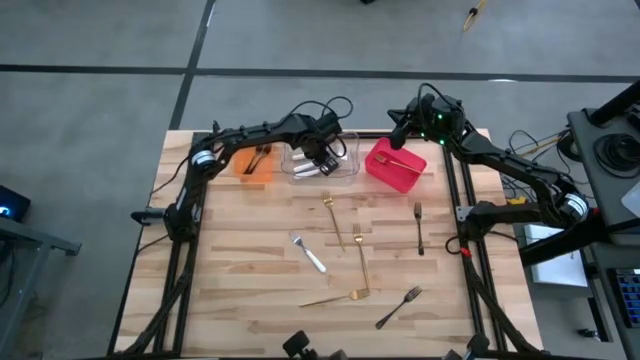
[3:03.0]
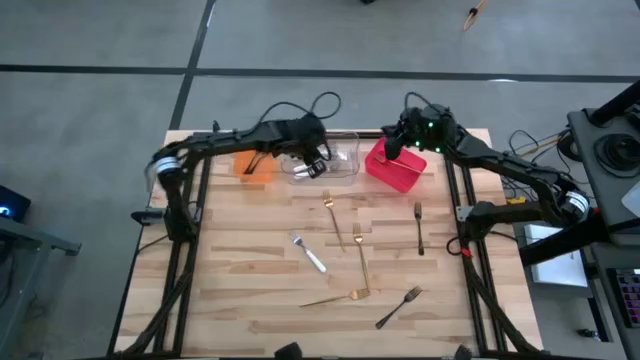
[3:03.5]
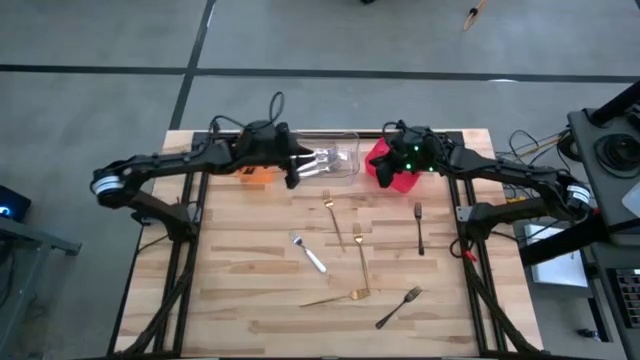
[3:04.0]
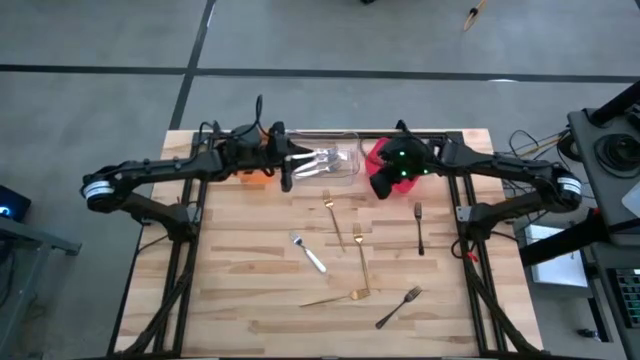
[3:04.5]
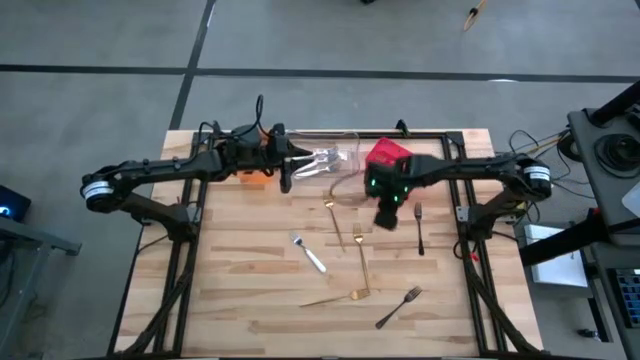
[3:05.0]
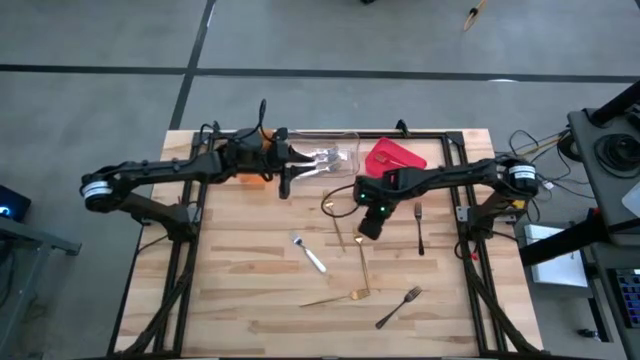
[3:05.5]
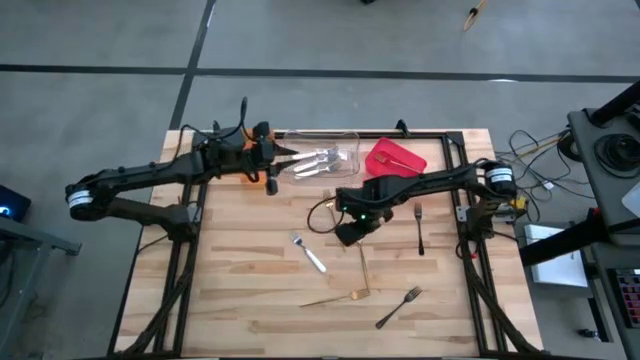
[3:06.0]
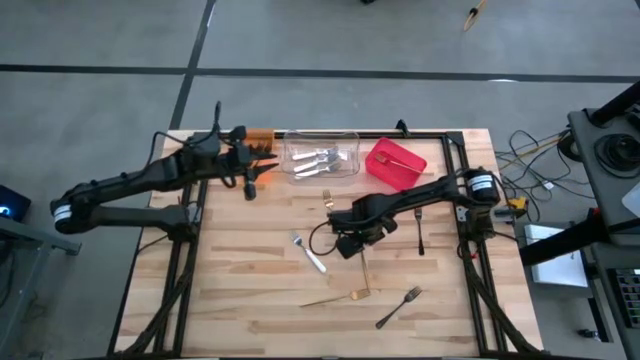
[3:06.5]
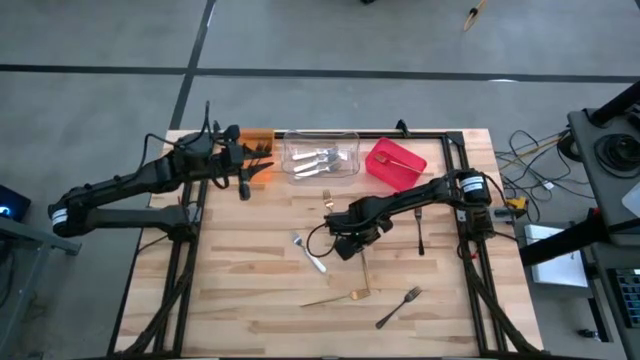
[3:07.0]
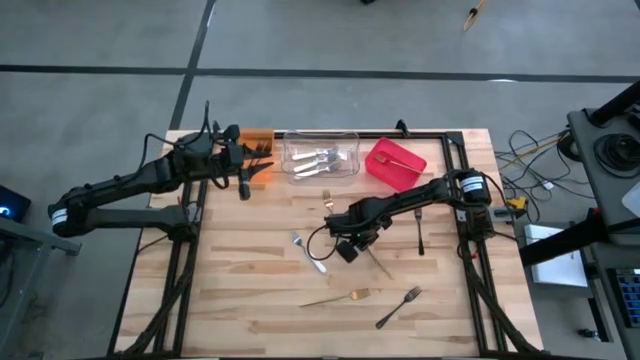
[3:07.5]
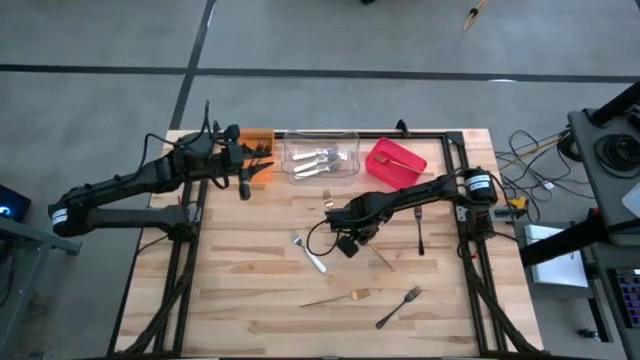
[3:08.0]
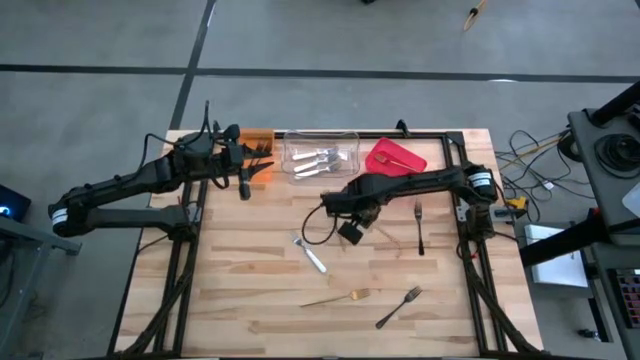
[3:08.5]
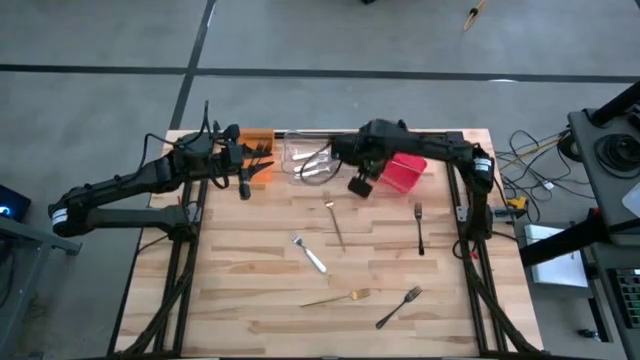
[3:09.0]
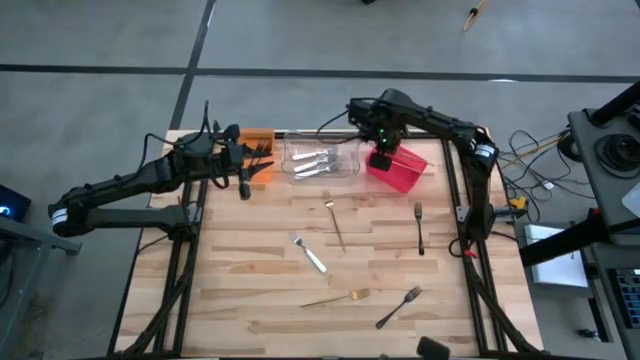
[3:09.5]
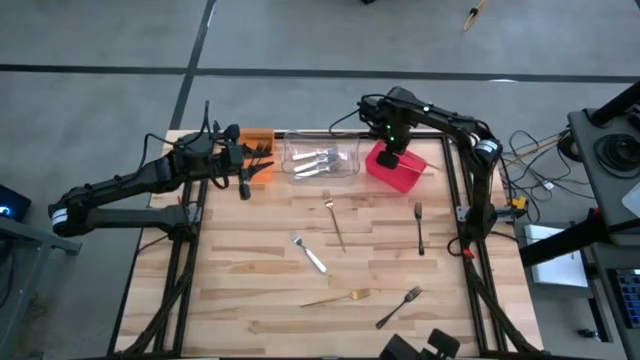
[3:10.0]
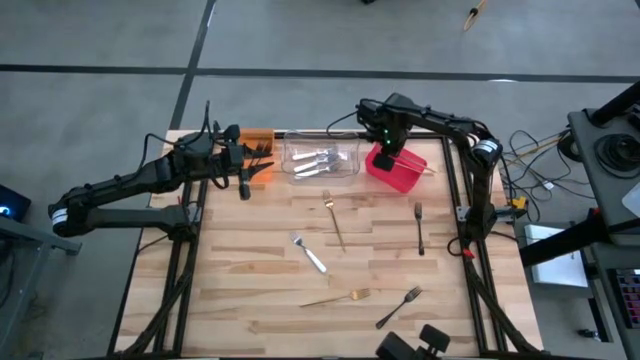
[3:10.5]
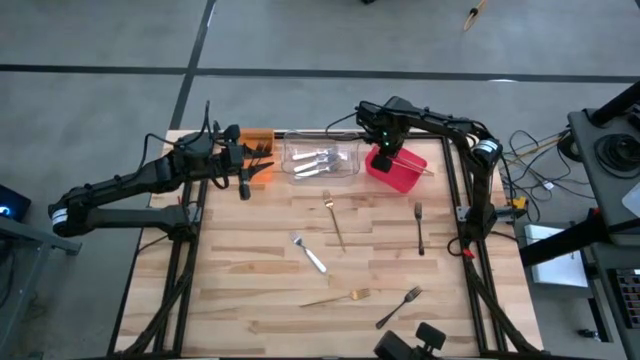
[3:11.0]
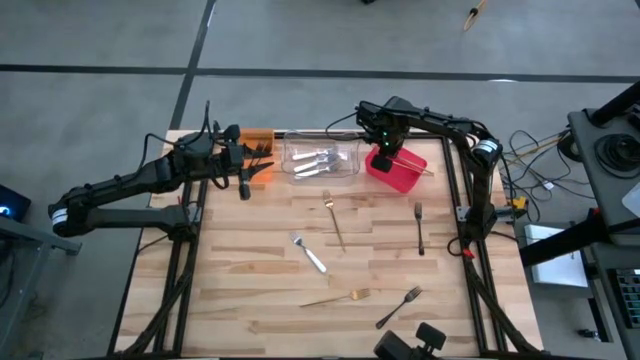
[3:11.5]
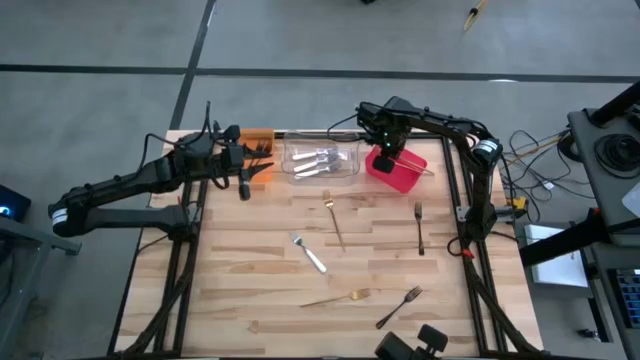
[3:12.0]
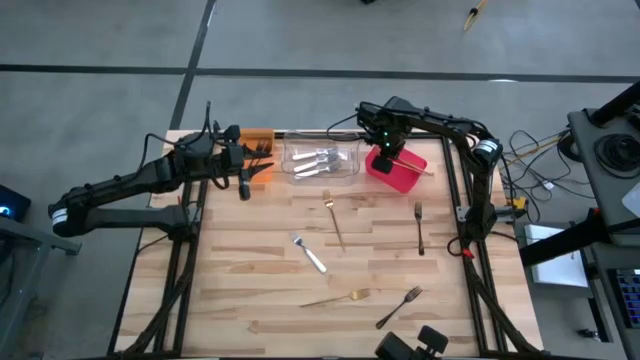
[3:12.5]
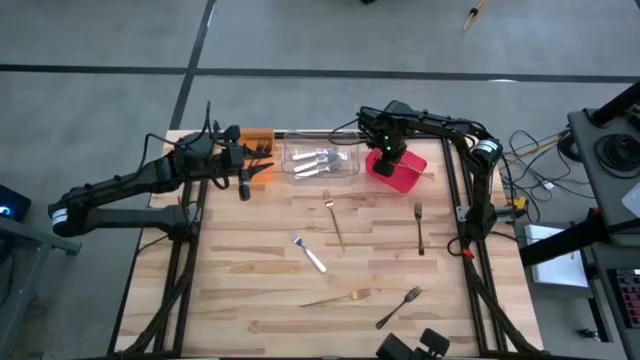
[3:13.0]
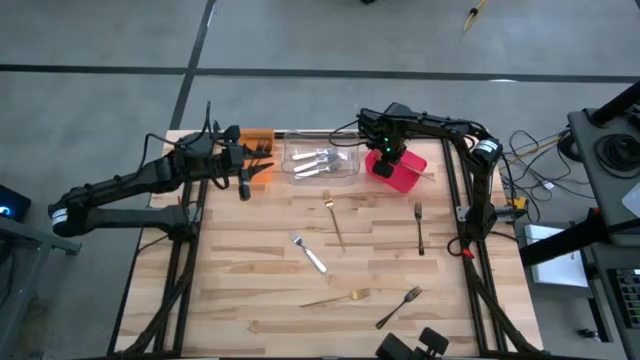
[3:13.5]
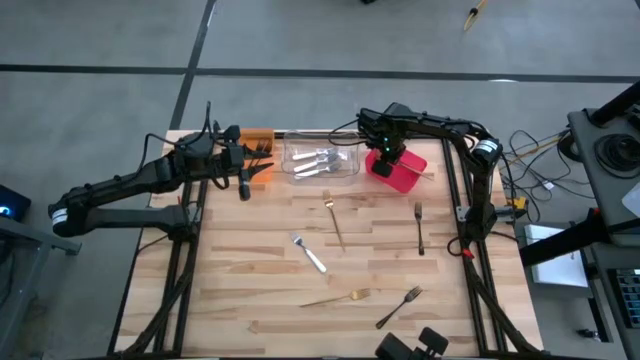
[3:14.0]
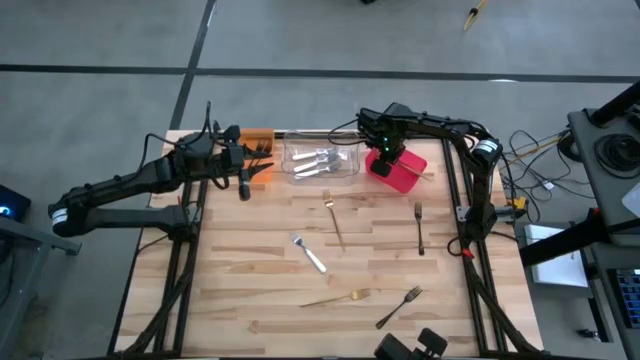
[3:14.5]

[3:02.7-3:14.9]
Task: Sort silverware by color (type)
Put the gold fork into the red bin

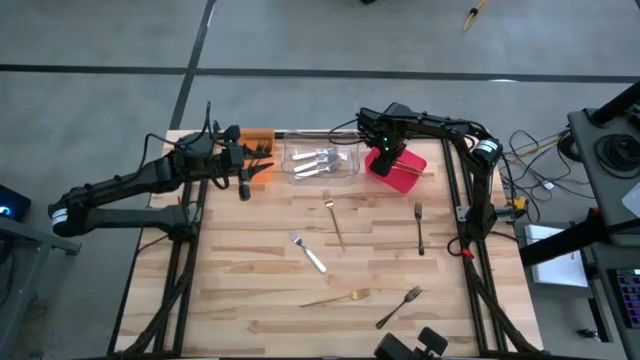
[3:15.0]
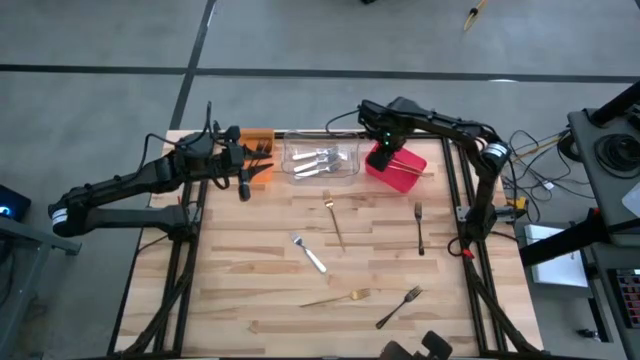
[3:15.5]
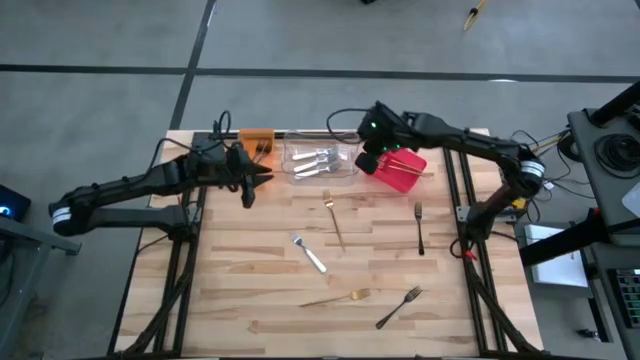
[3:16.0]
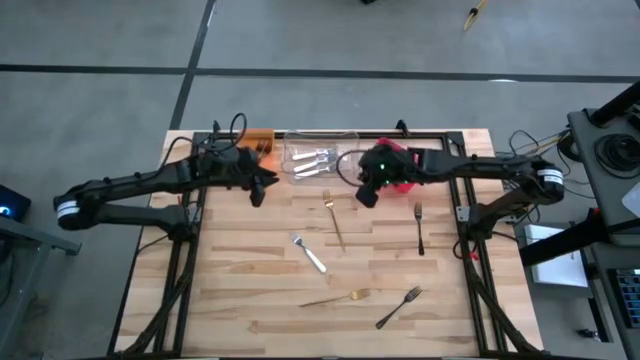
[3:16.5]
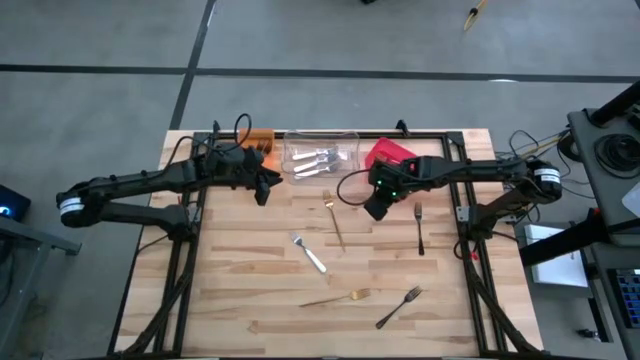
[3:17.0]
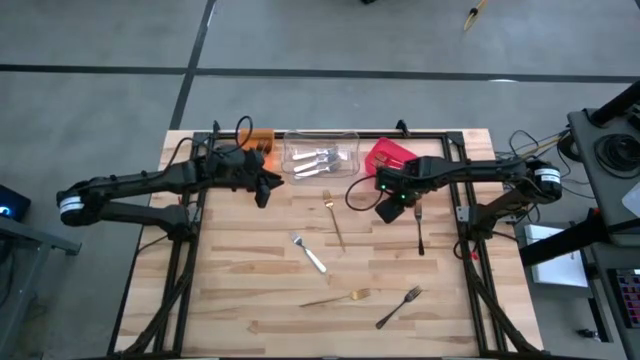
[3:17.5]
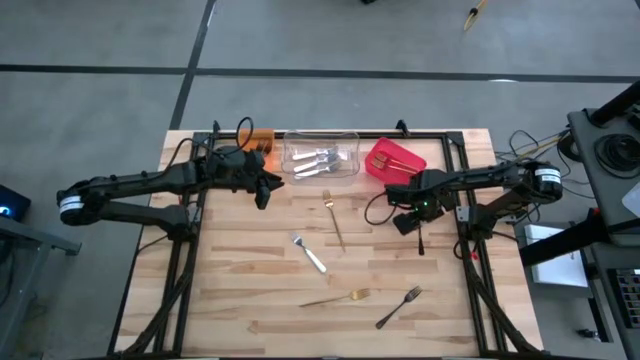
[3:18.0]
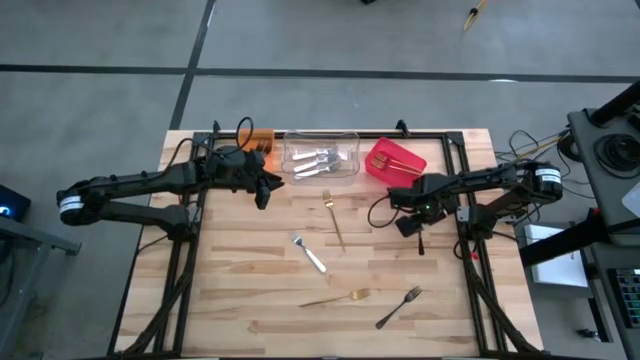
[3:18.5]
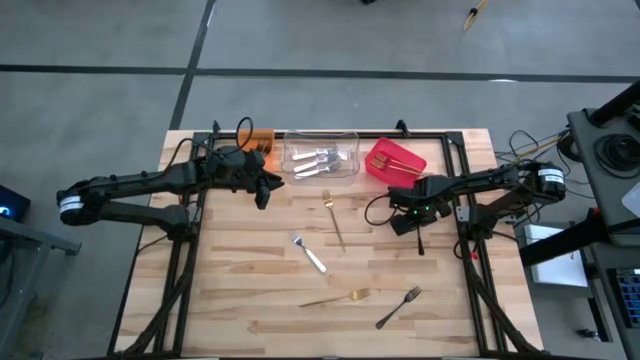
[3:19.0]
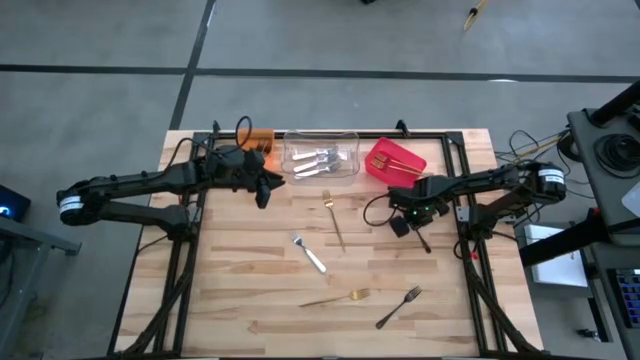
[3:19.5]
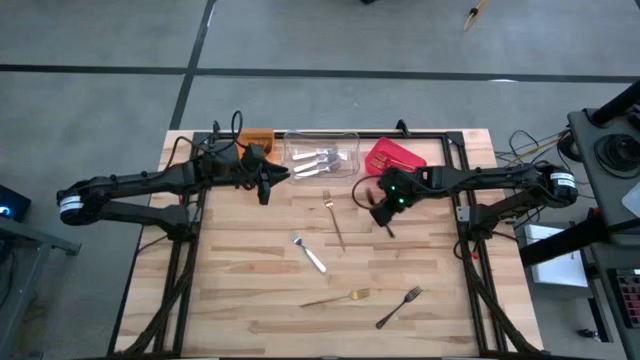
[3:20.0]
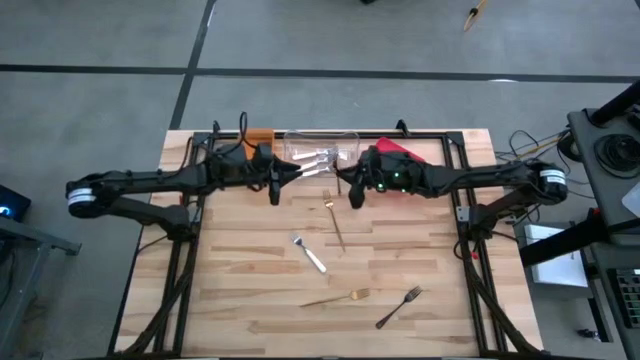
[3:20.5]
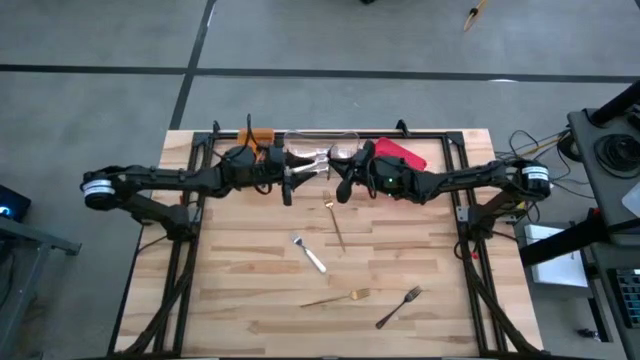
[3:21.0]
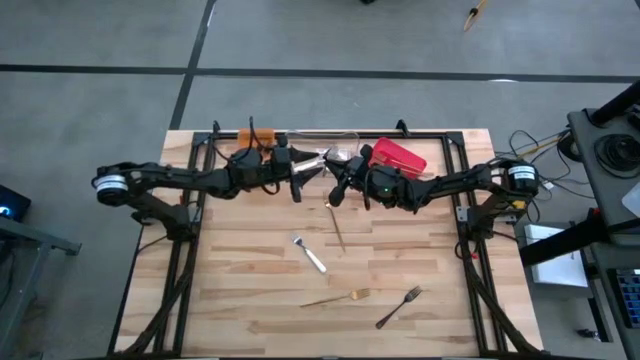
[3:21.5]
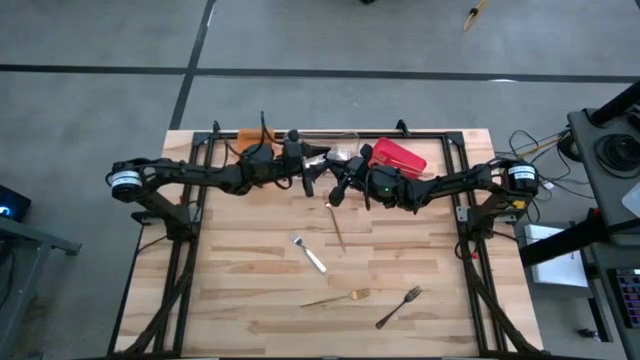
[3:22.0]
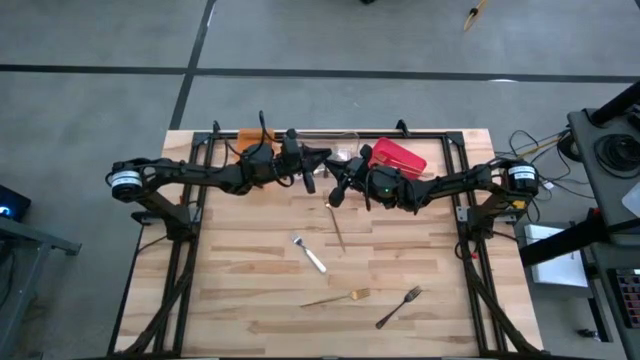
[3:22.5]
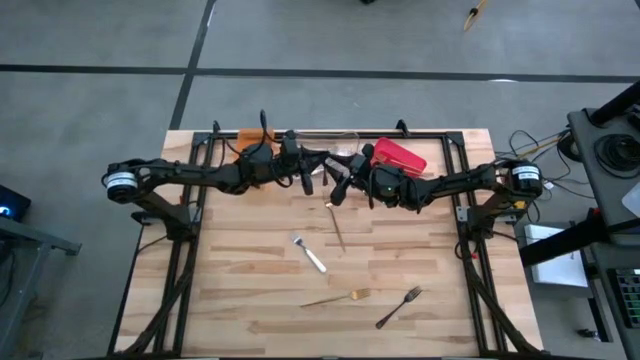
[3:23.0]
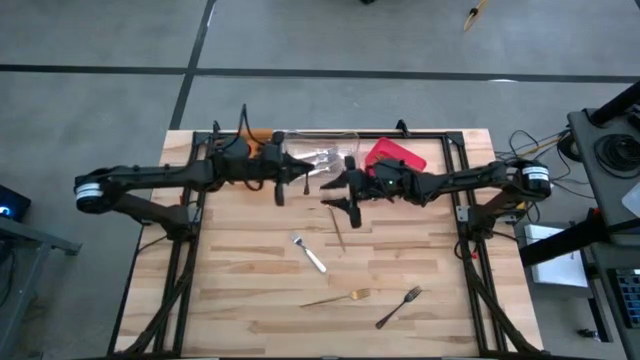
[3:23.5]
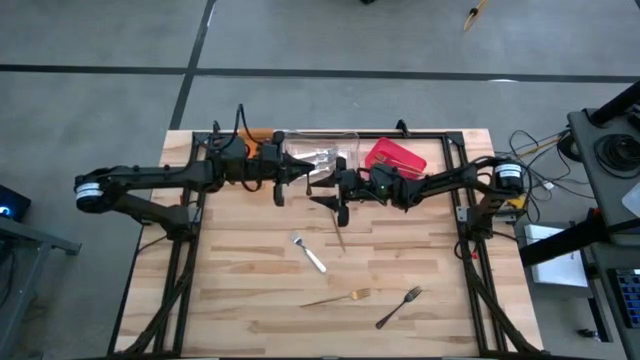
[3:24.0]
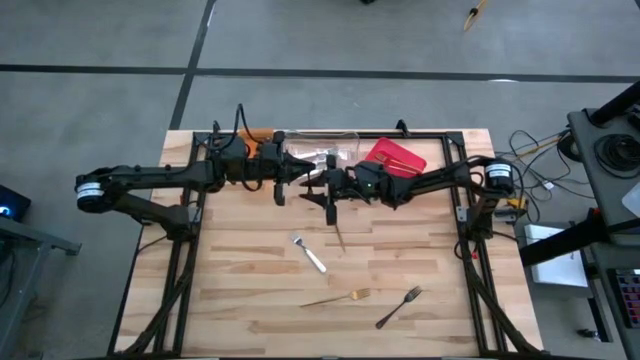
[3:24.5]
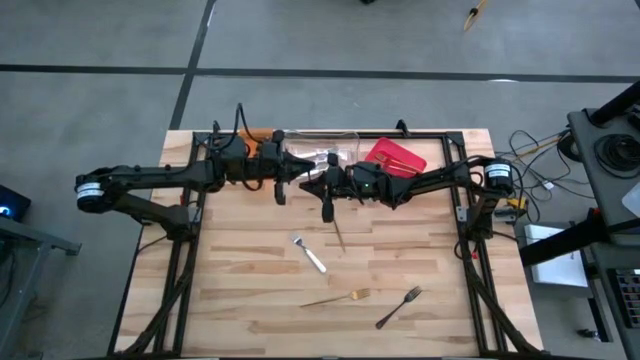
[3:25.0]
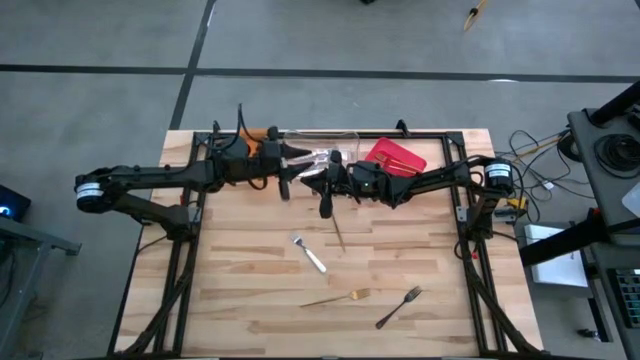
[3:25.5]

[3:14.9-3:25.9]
Put the black fork into the orange bin
